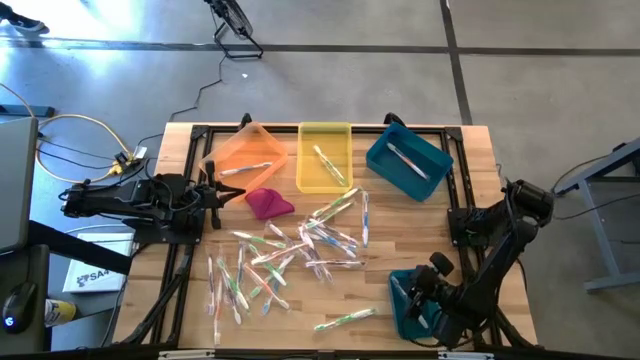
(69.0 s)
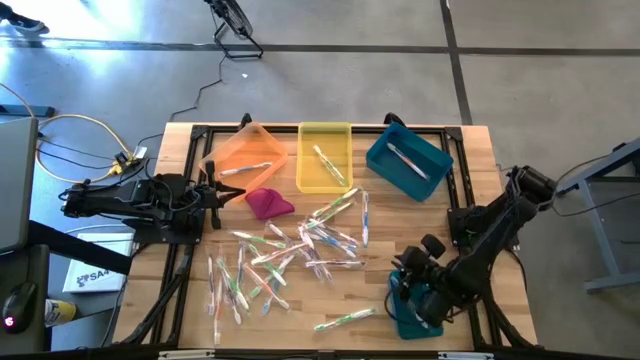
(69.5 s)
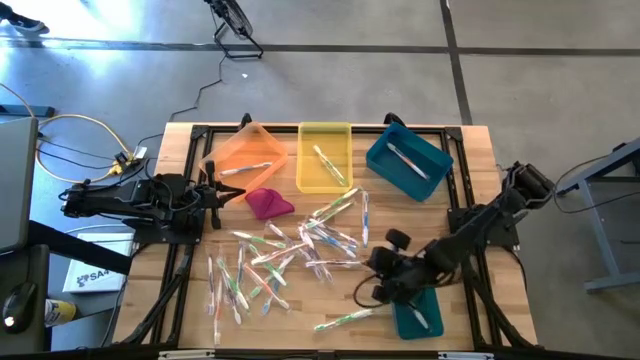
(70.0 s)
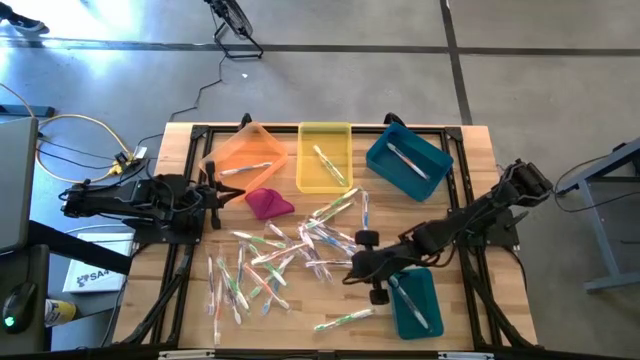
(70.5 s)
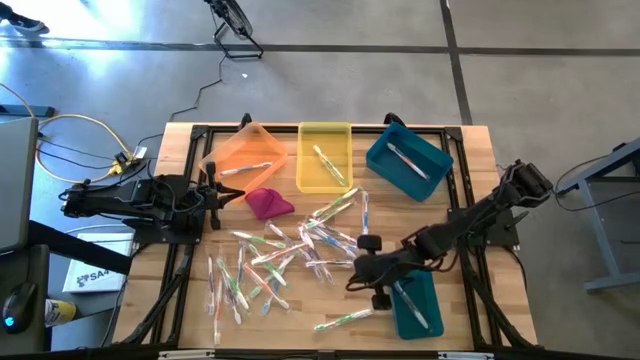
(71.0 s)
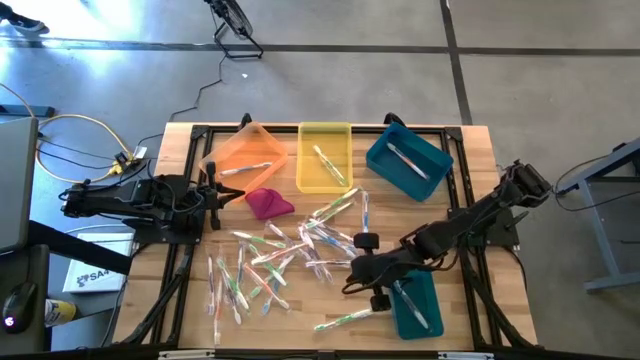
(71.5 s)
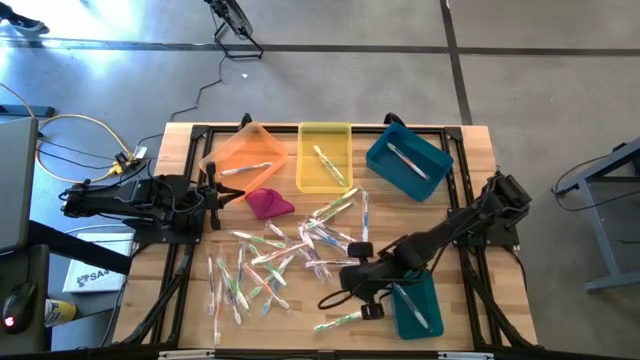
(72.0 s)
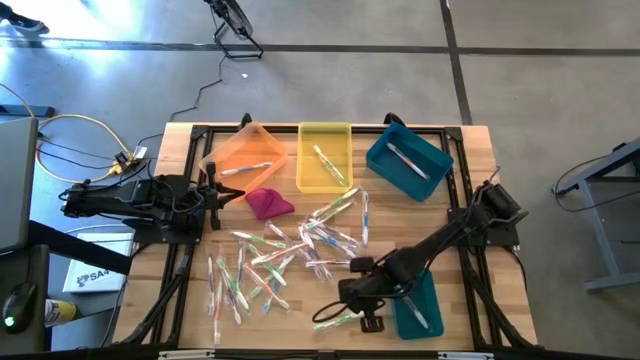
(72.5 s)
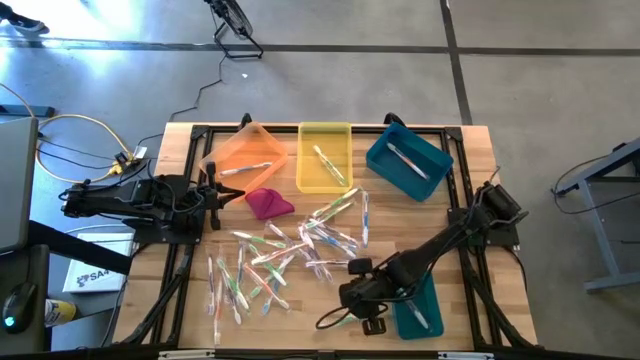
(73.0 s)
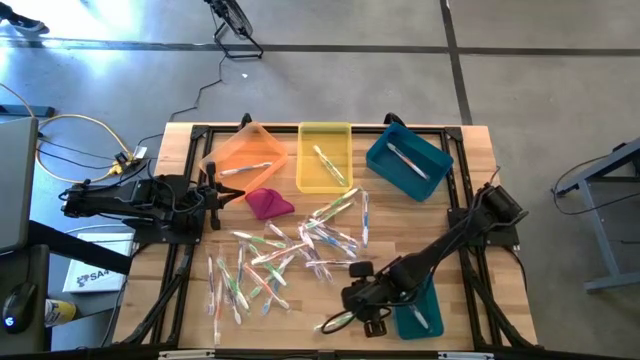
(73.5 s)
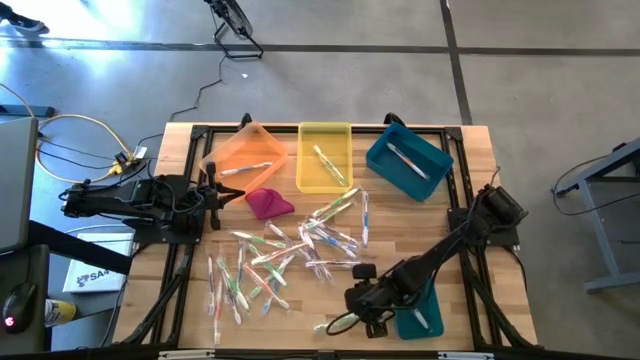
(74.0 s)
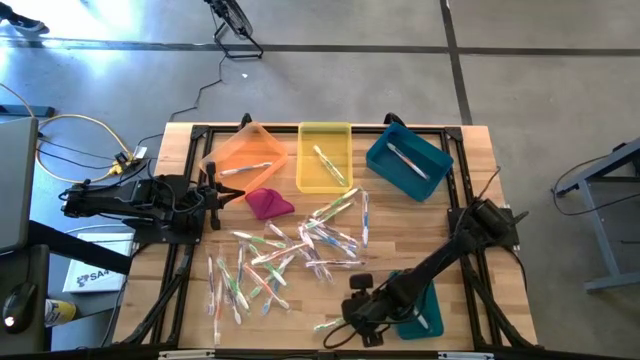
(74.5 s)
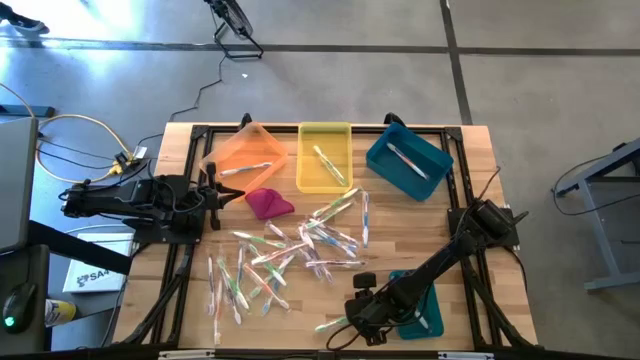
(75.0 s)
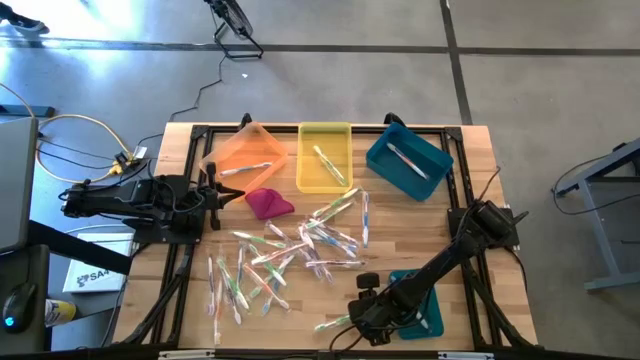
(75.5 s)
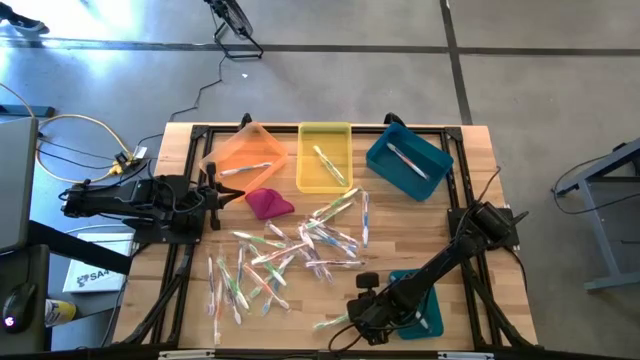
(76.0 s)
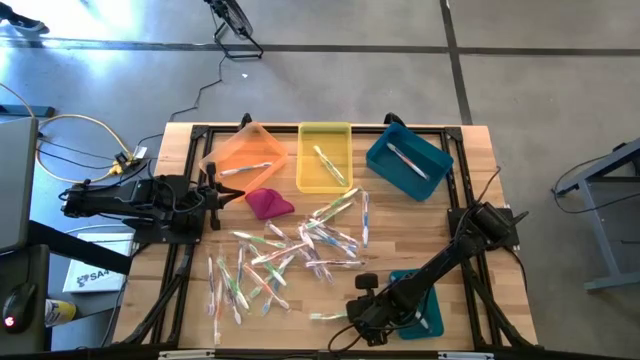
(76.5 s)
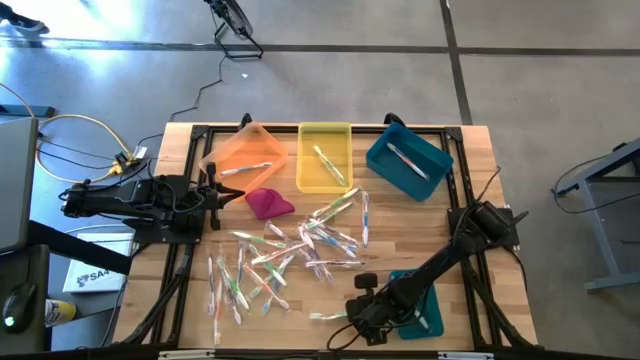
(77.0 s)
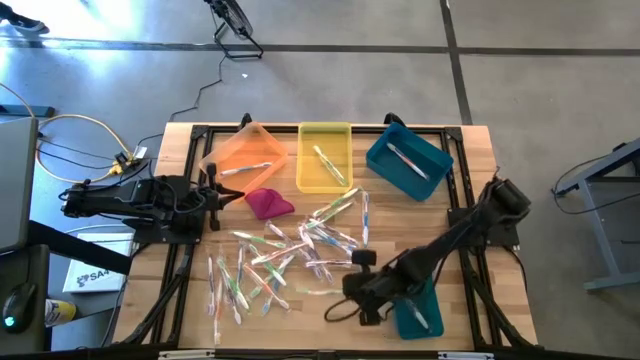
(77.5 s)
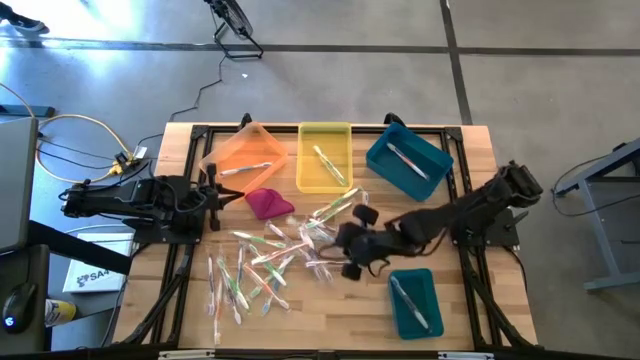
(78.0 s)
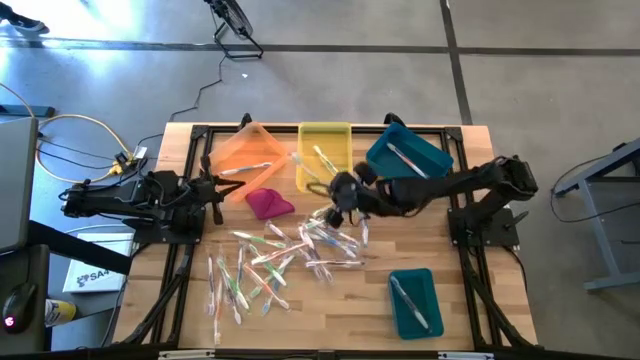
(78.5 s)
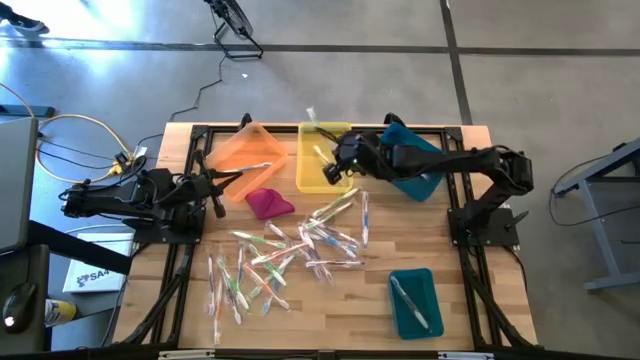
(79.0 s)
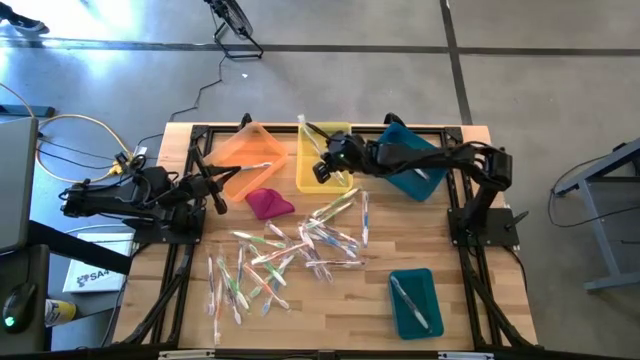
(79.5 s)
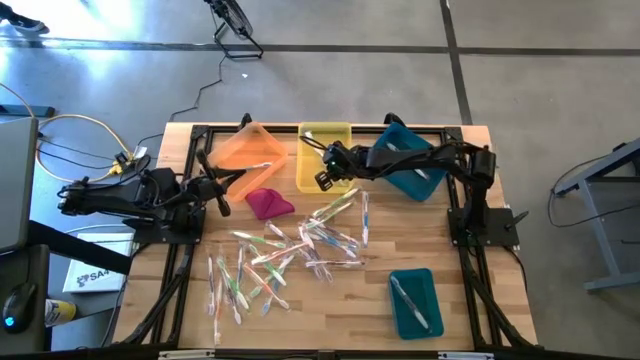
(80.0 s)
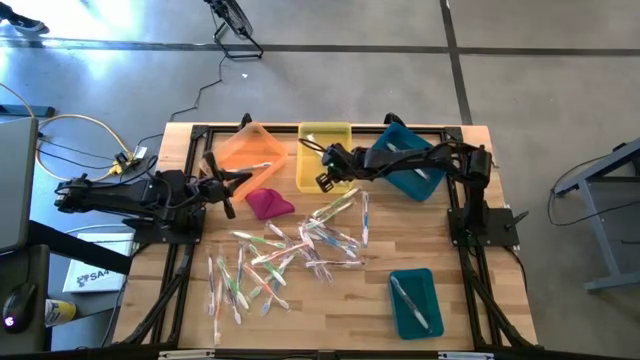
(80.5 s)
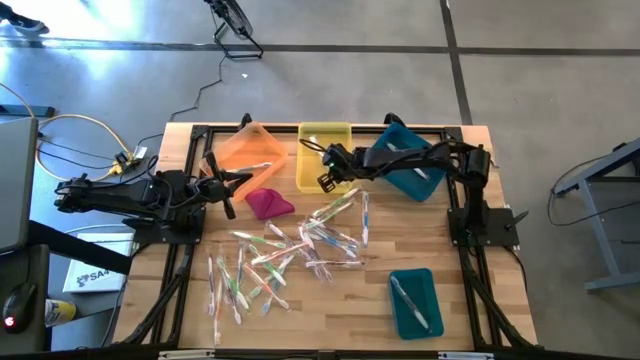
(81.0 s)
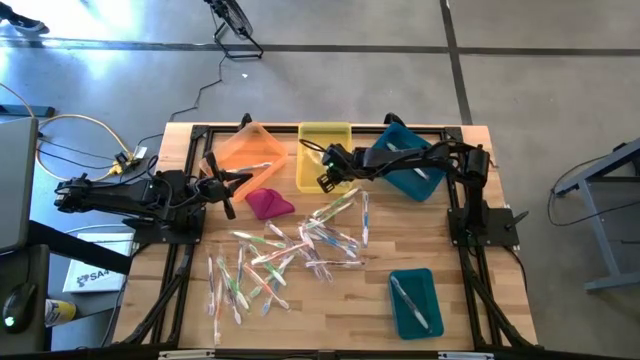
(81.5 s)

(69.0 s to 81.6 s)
Task: Pick & Place Toothbrushes
Put the green toothbrush into the yellow bin

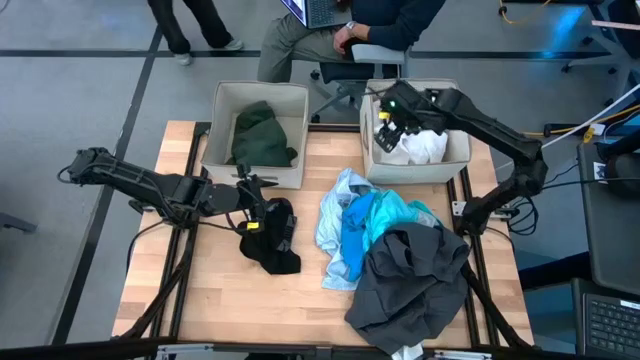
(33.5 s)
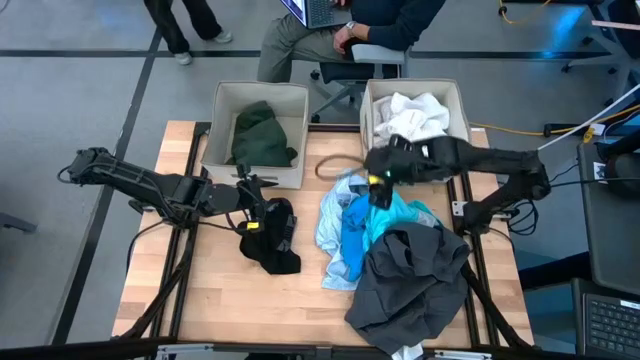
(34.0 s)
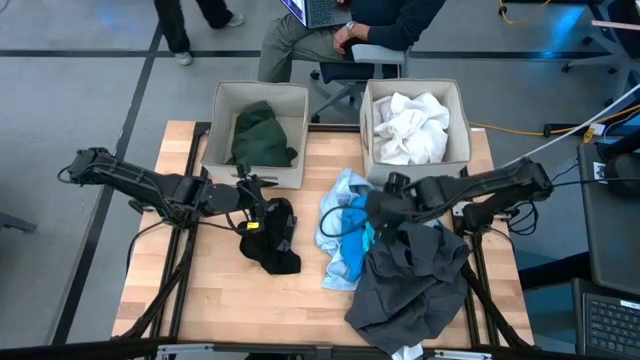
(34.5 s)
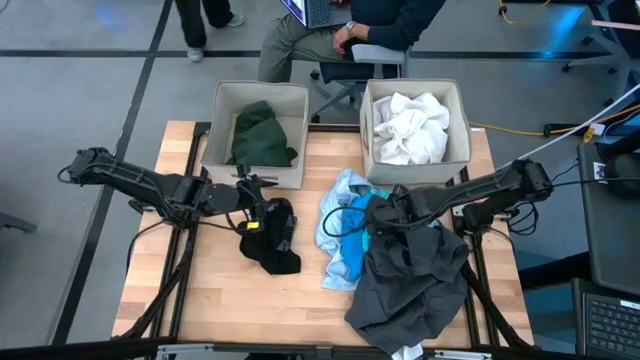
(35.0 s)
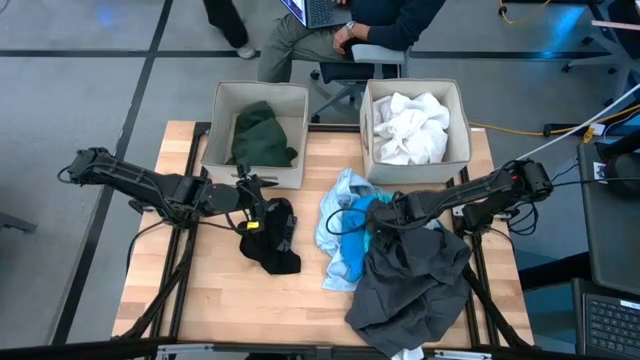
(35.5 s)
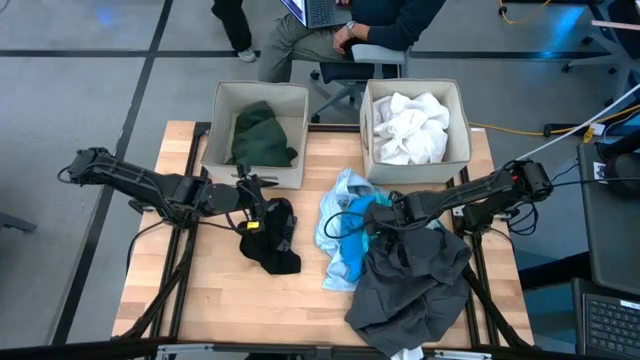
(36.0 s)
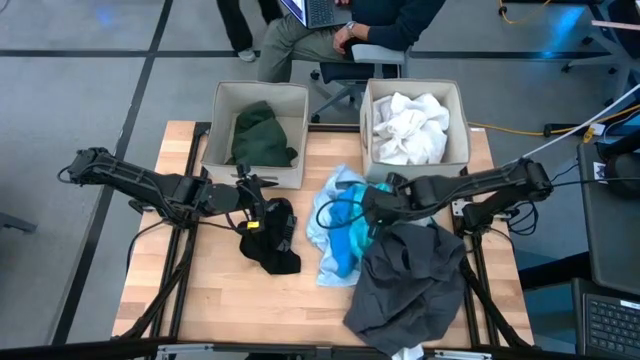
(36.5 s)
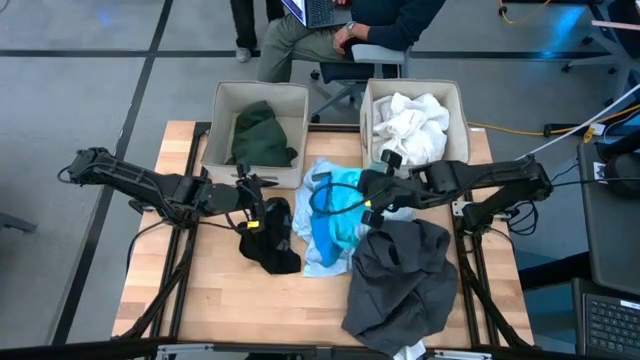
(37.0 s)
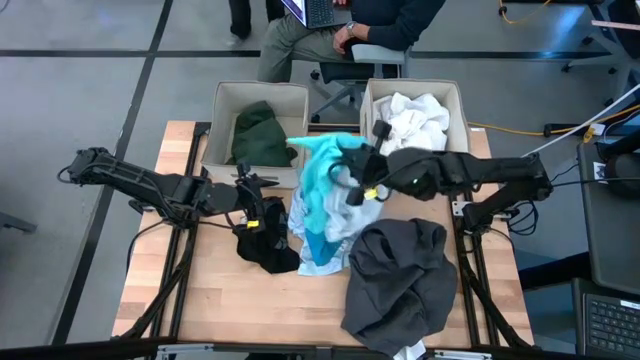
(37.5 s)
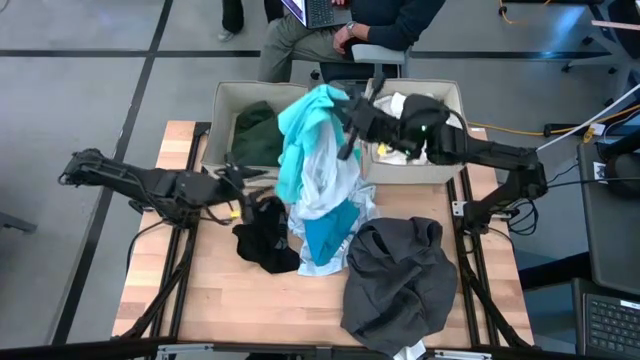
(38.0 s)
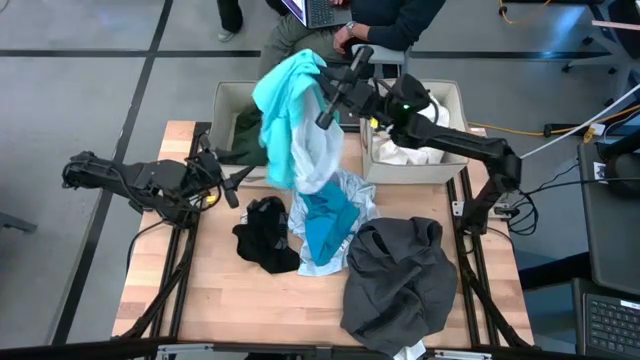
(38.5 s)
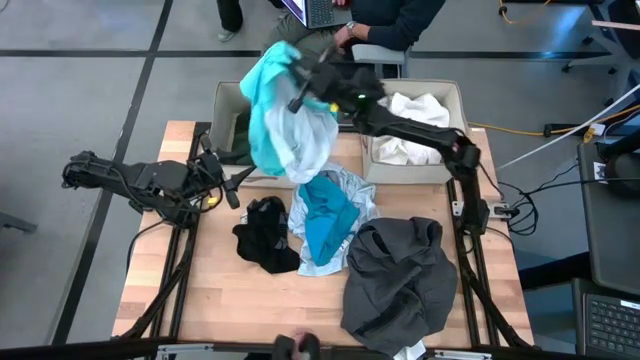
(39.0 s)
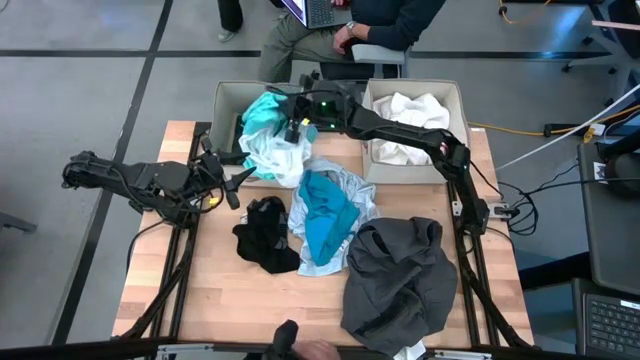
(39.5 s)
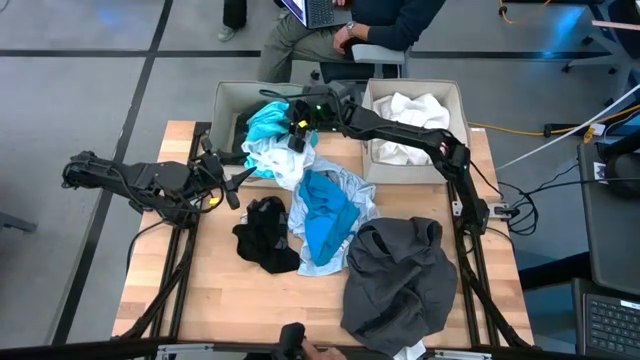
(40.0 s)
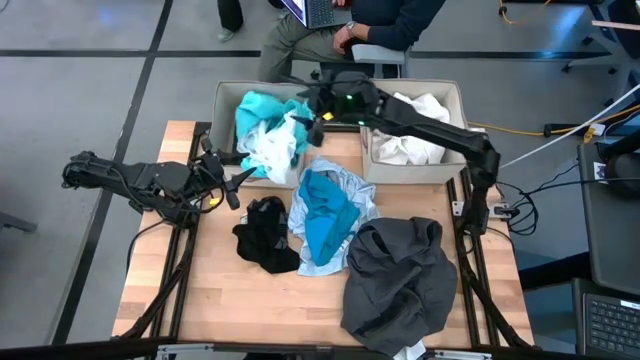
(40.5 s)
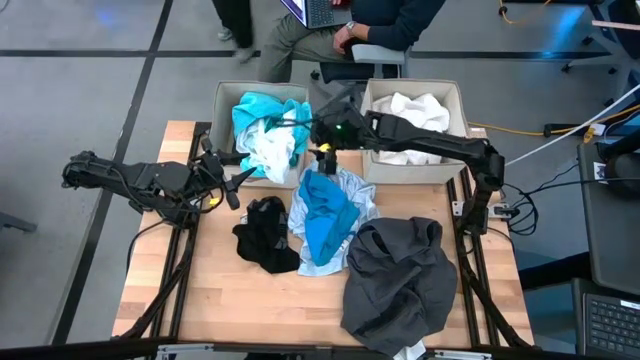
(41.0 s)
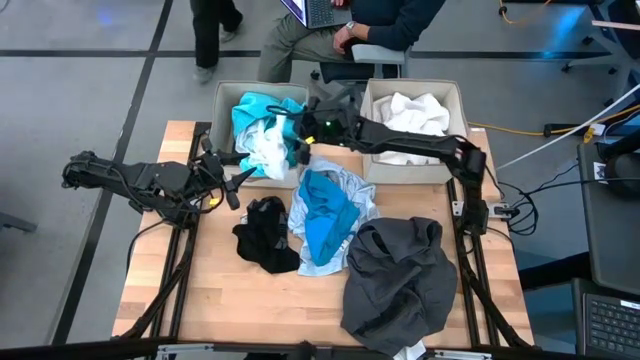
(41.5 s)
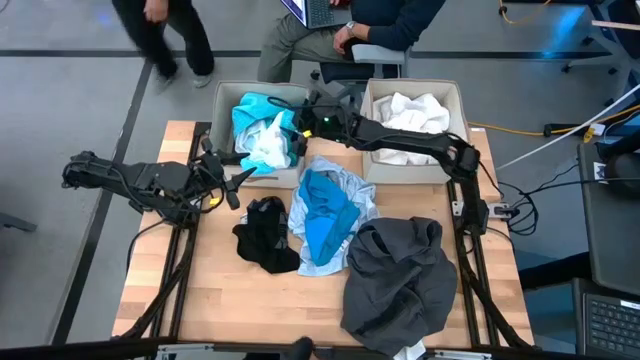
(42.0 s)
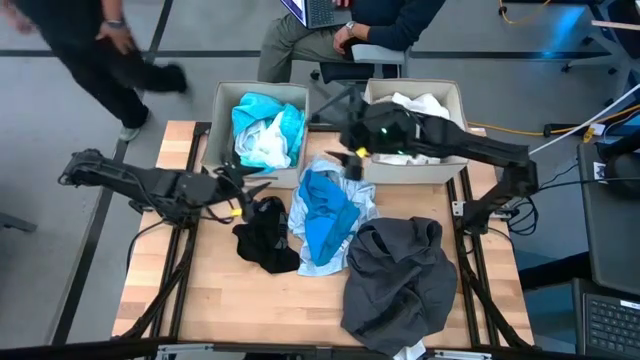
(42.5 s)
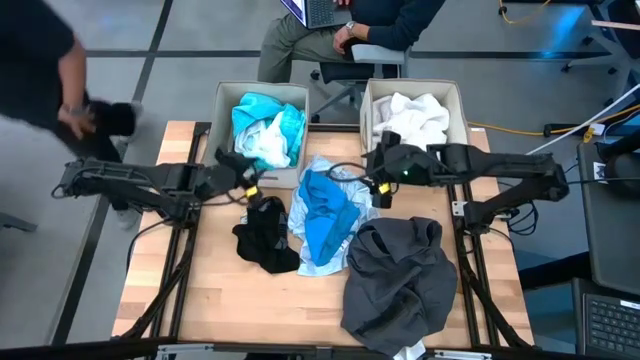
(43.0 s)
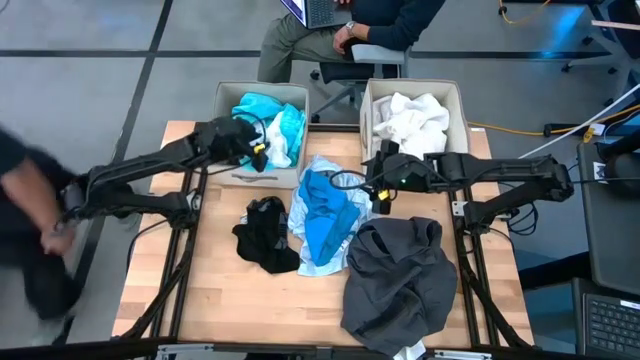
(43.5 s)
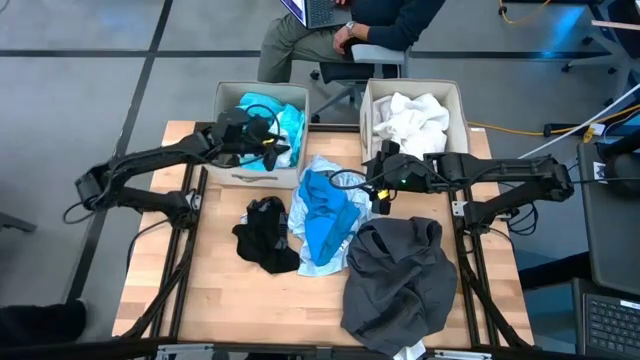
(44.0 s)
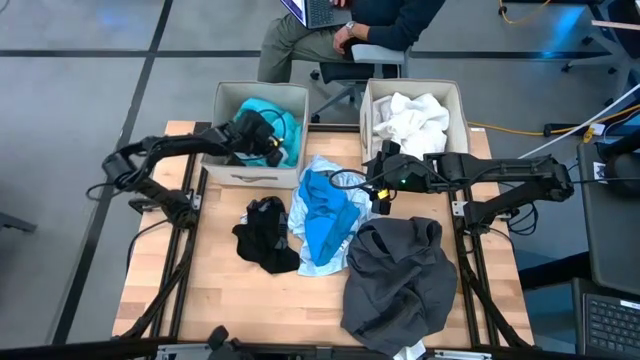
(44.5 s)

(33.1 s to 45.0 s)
Task: Sort clothes
Put the light blue shorts into the left laundry organizer
